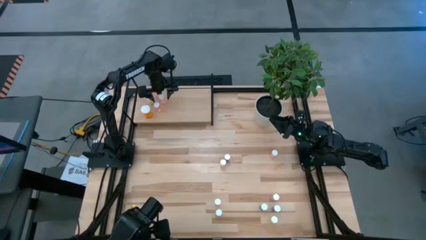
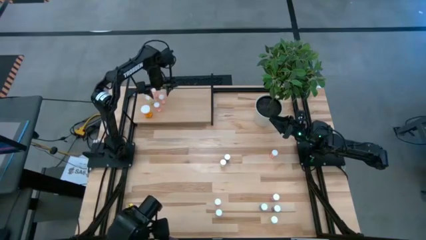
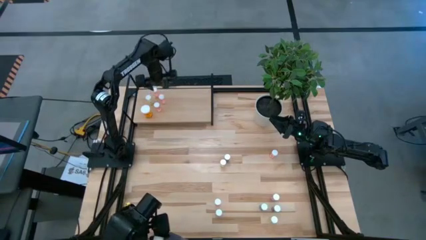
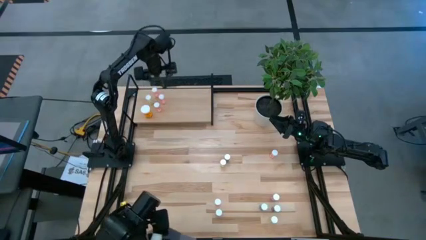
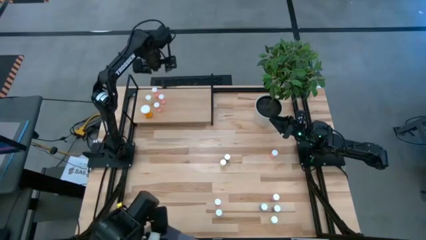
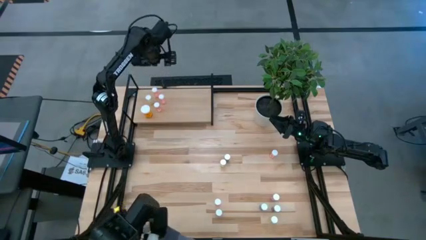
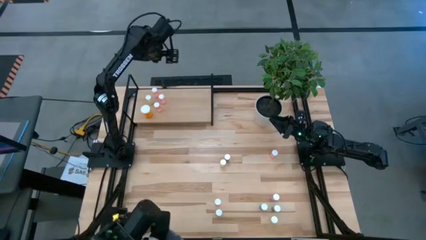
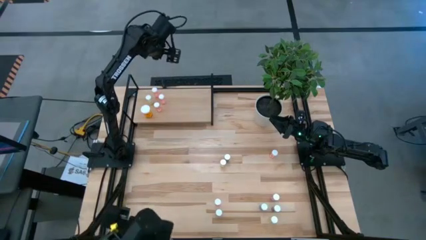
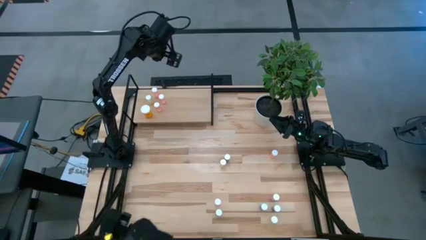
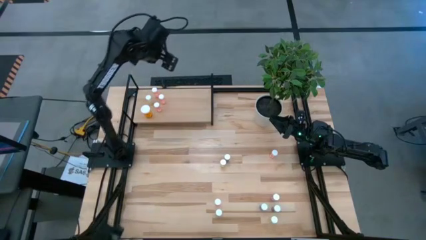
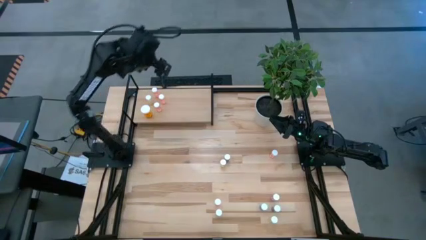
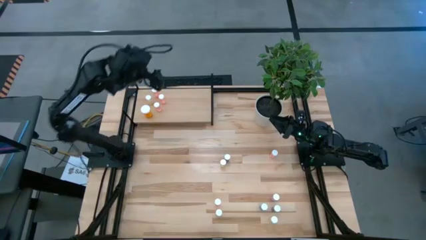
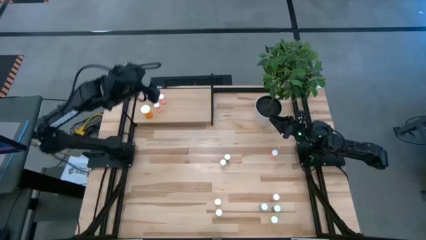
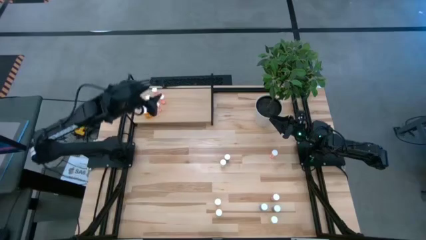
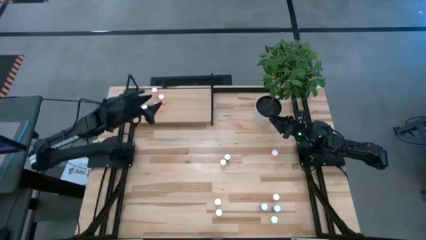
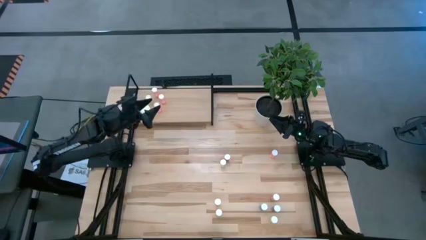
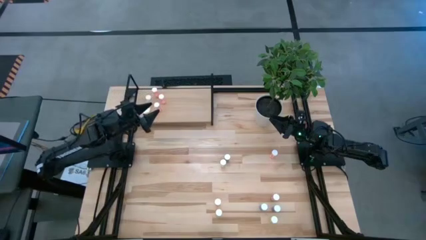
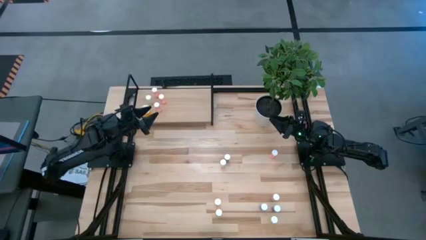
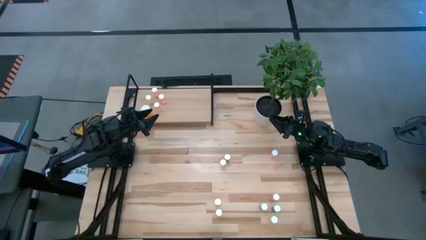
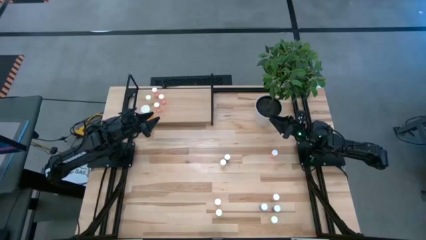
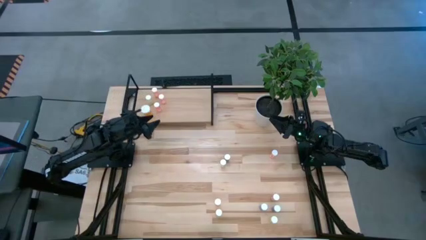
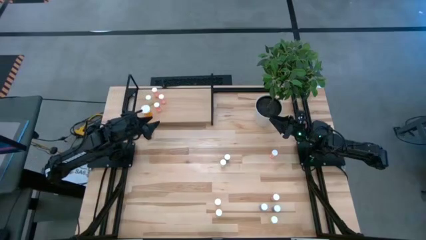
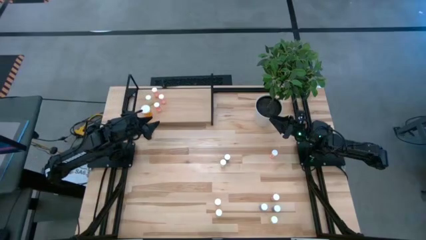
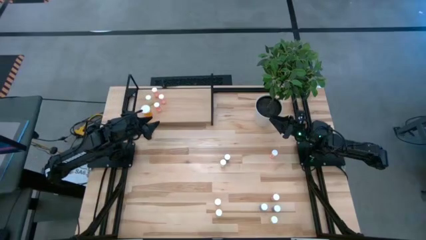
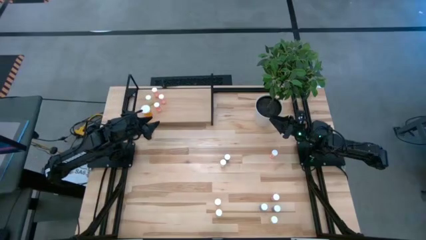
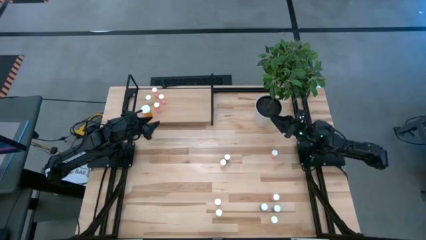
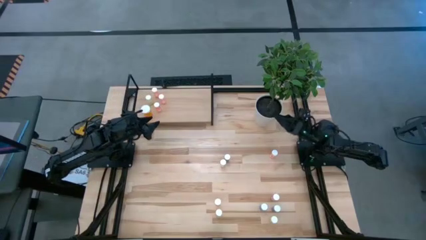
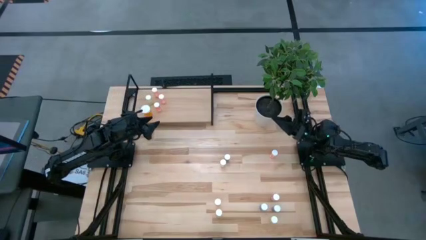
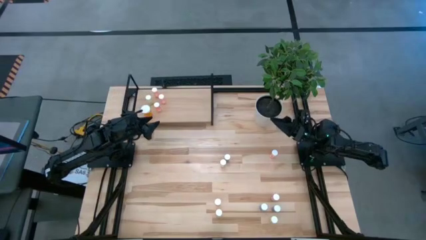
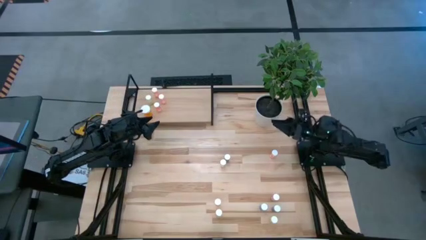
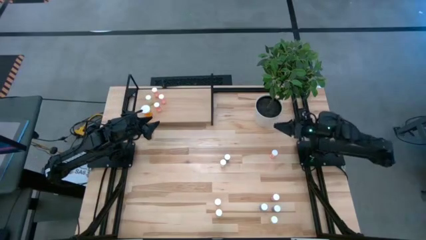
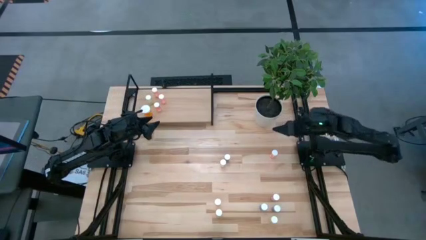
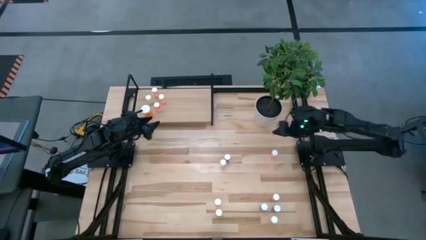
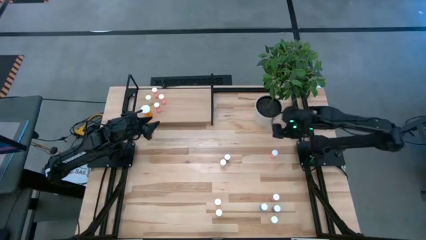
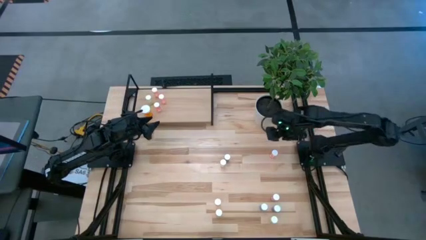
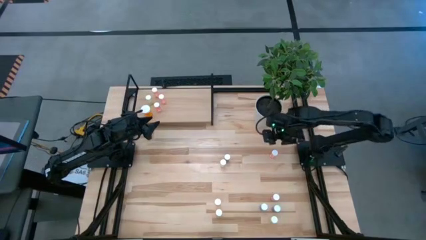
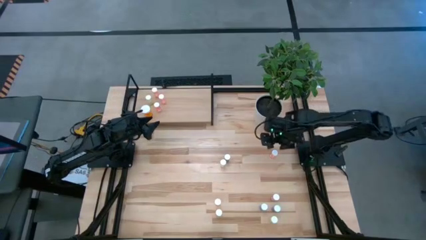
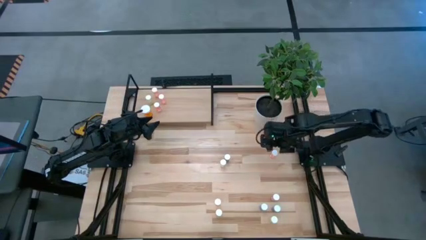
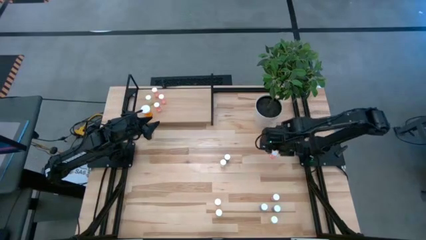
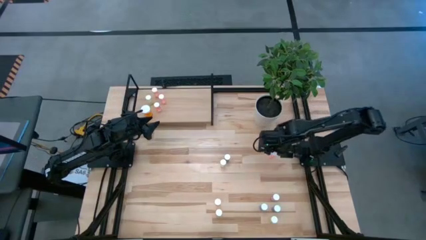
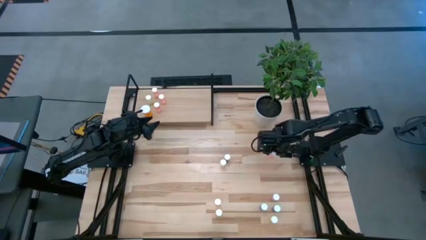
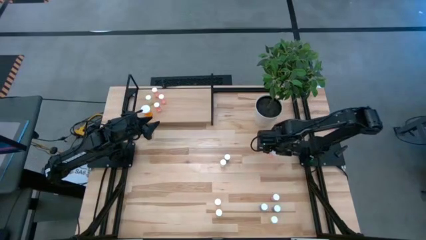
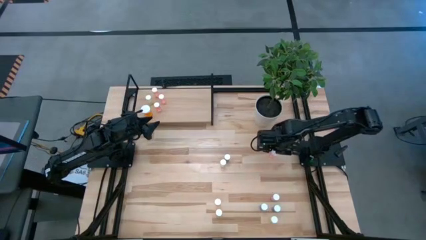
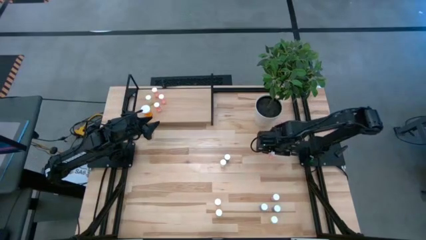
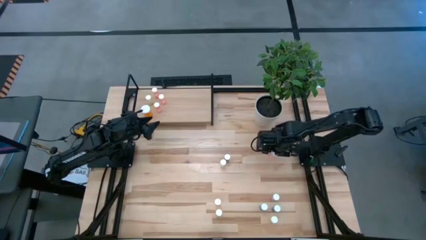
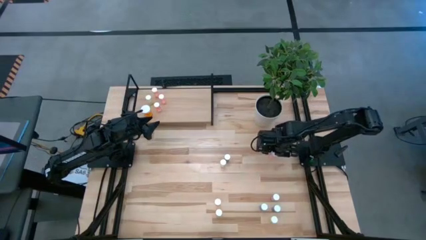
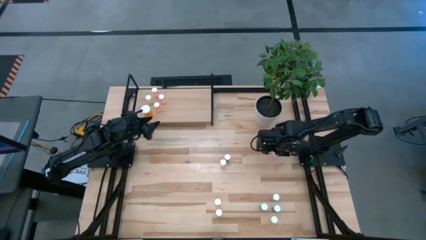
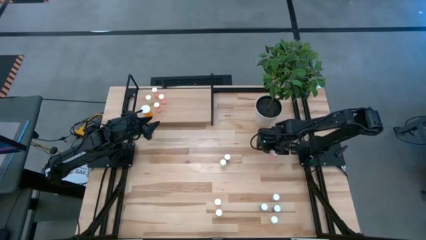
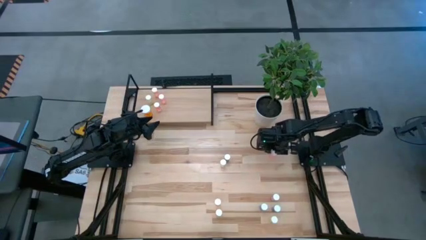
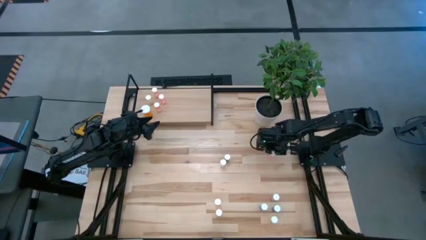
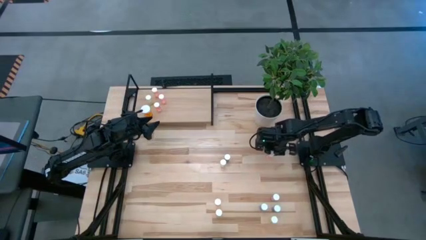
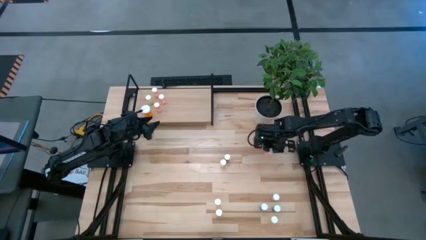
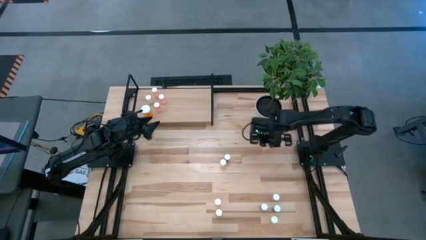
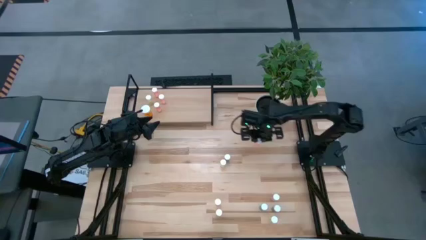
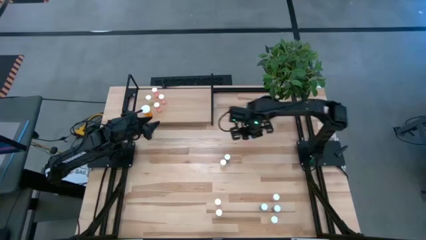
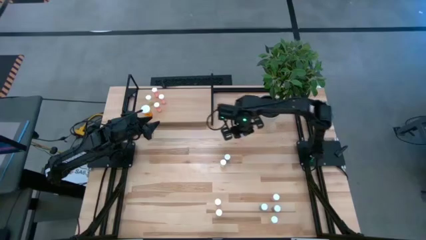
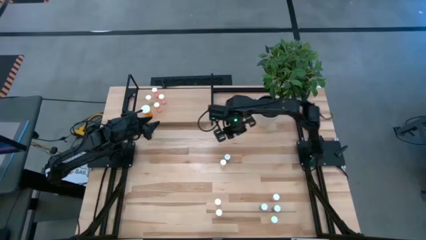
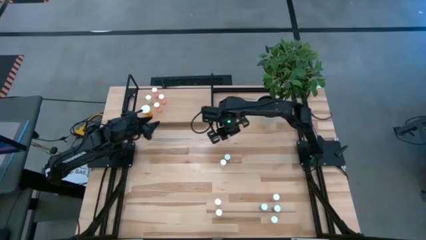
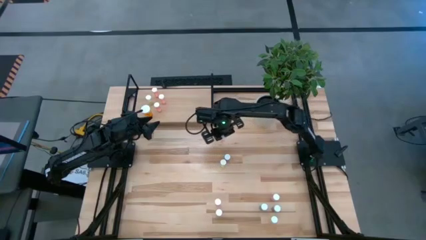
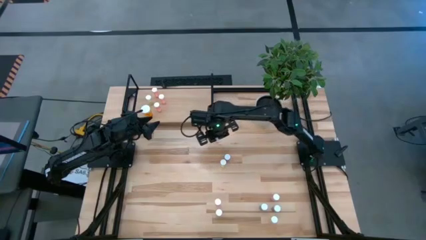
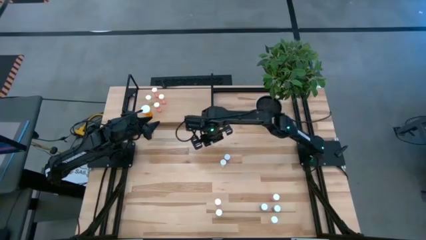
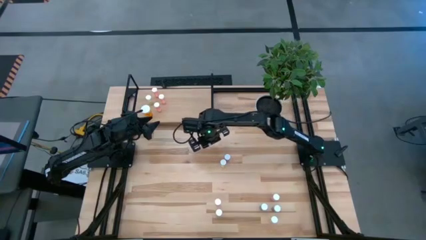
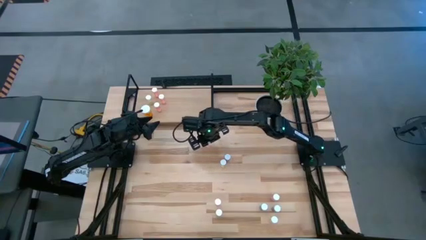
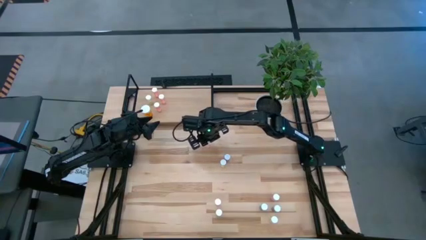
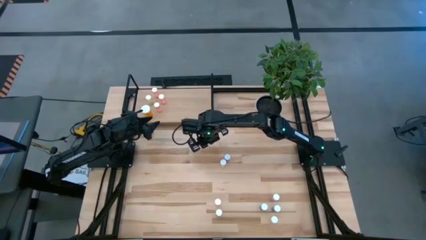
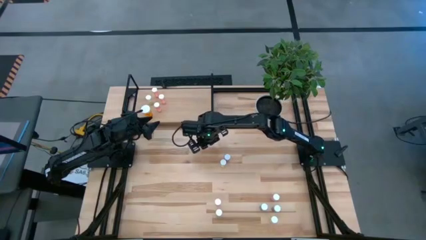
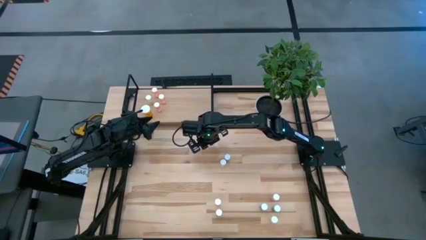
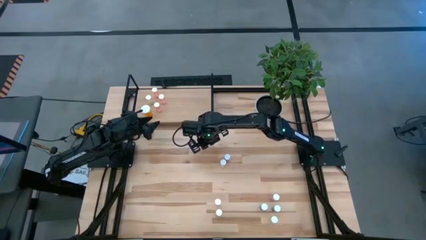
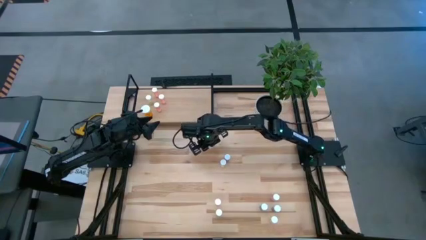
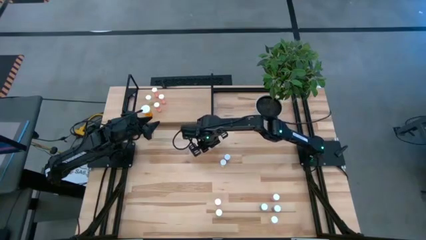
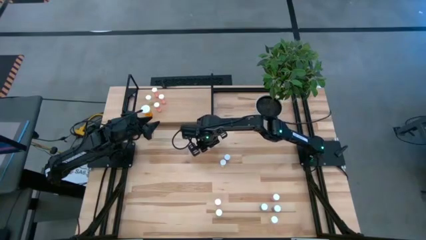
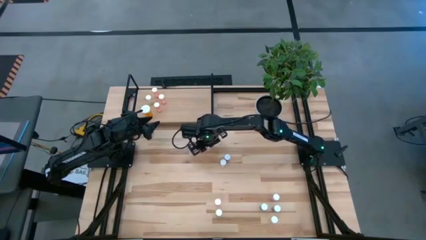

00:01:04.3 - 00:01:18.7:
Task: Pick and place medicine bottles onto shelf by color
Move the pink pill bottle to the center
